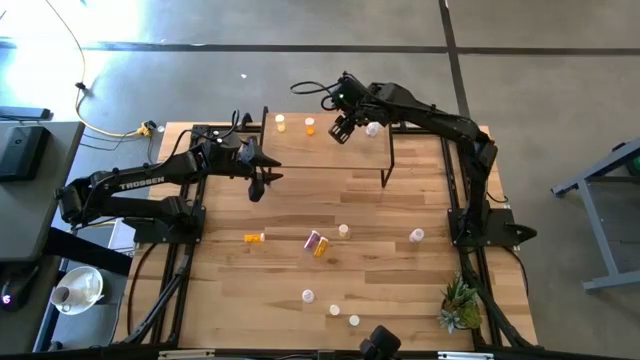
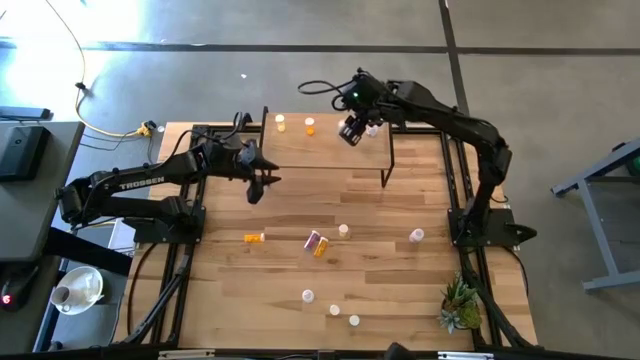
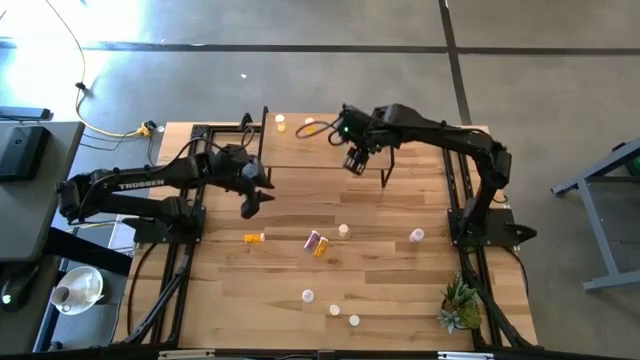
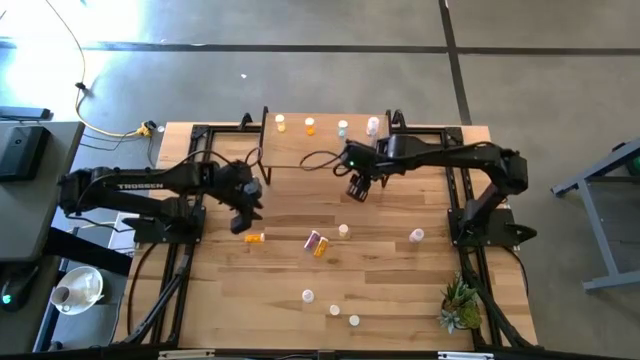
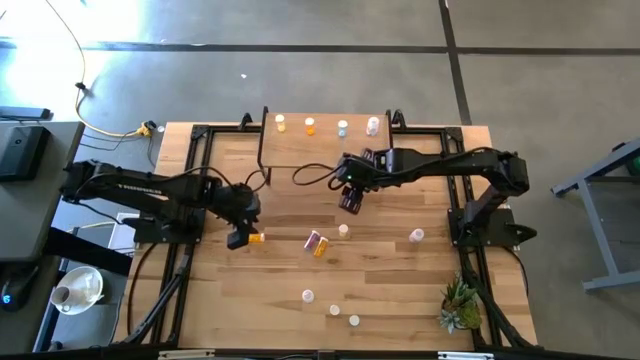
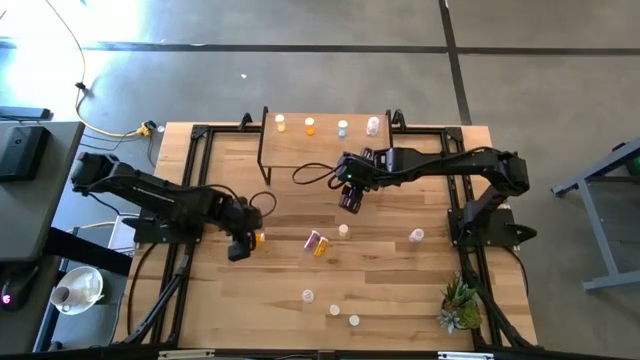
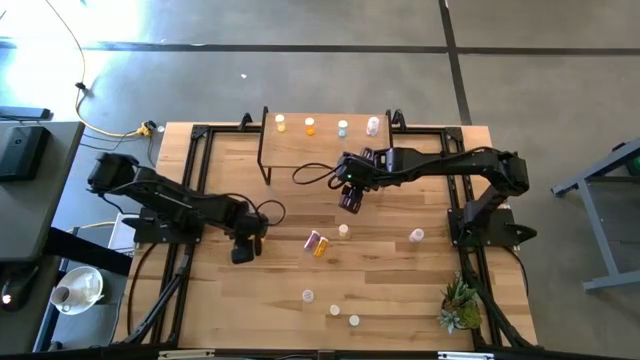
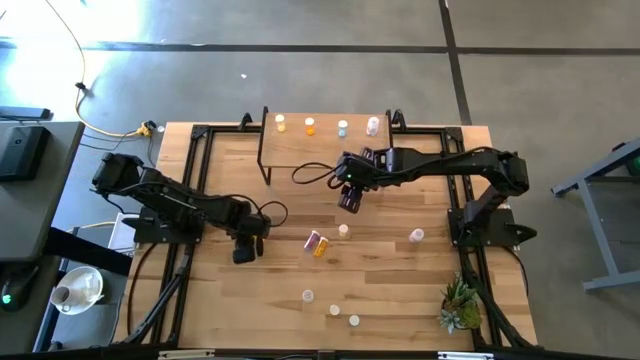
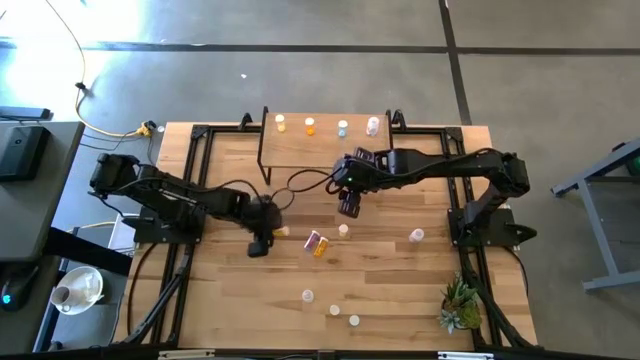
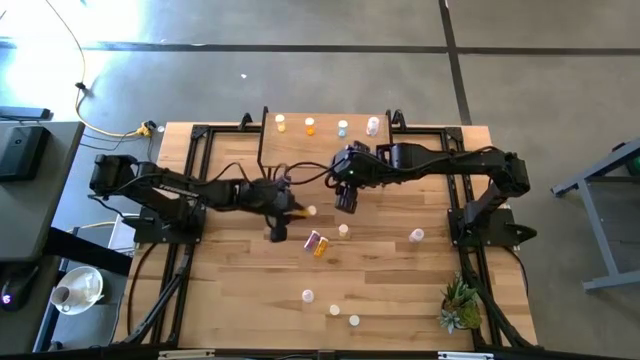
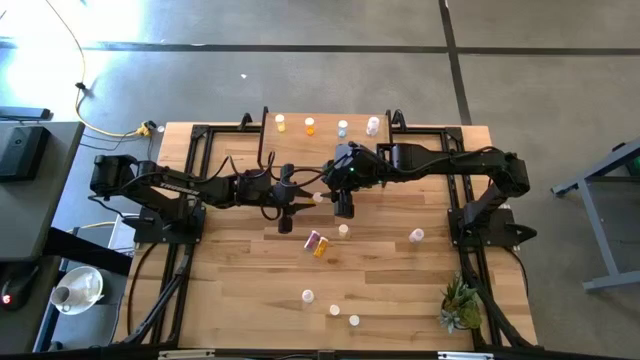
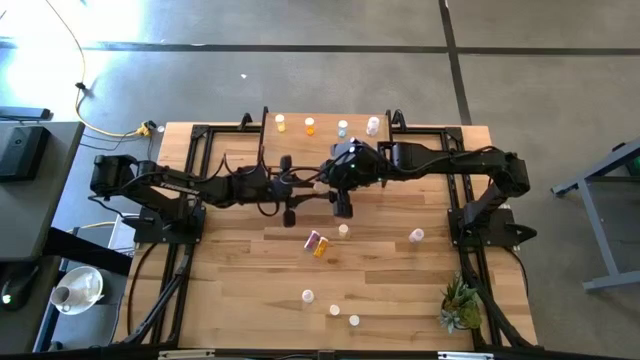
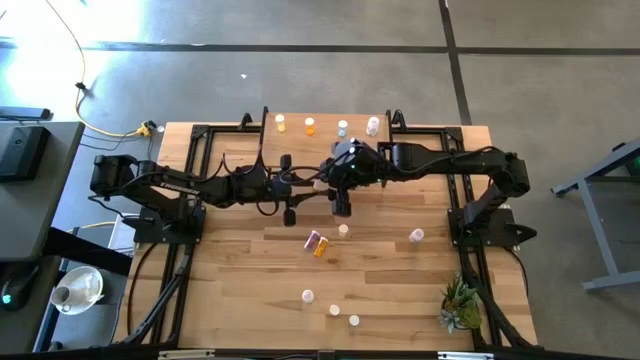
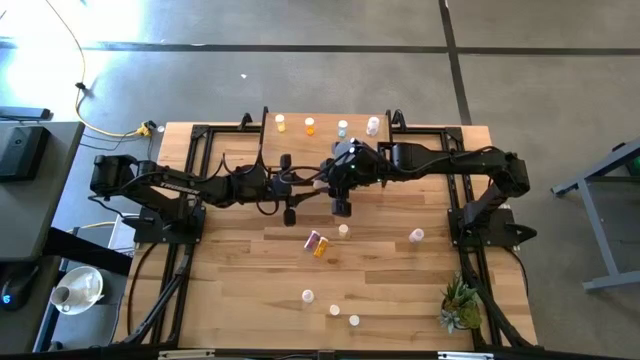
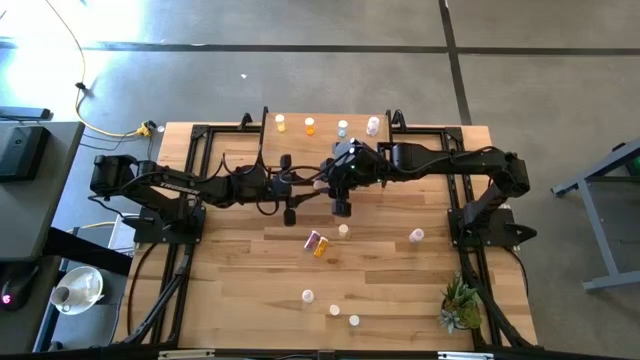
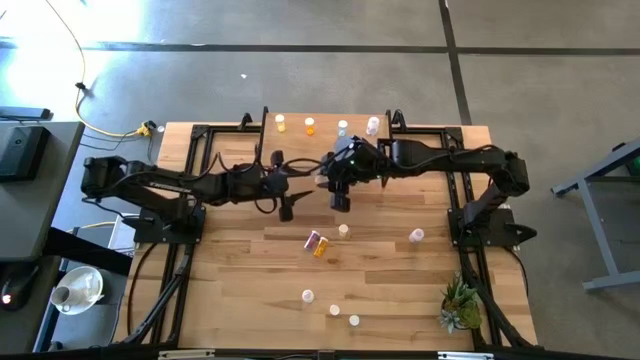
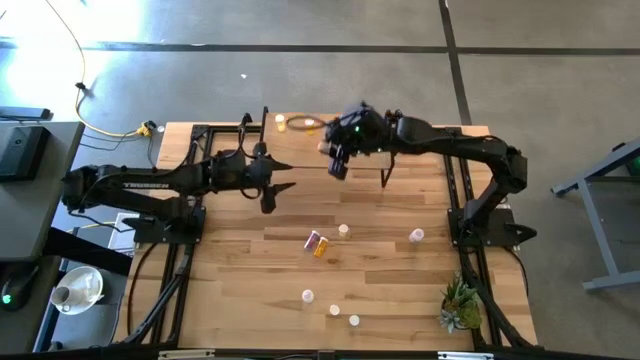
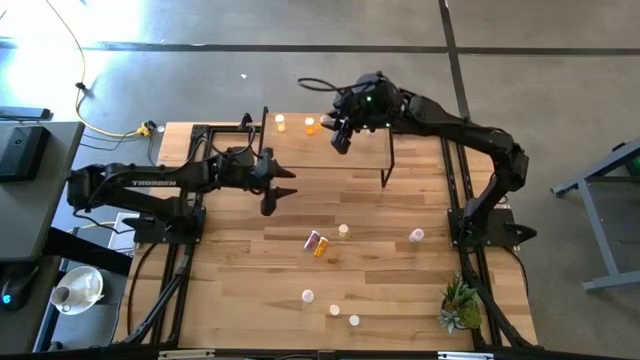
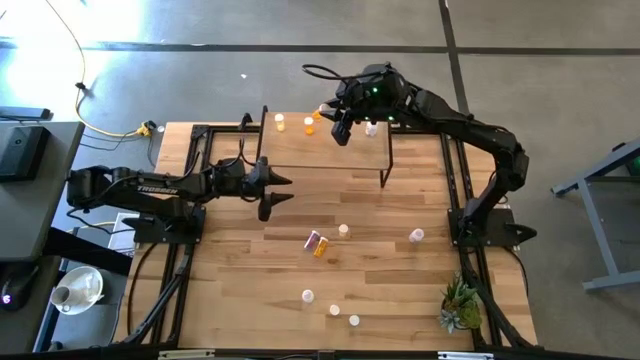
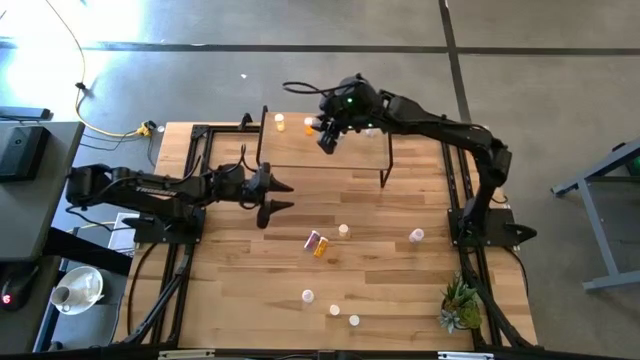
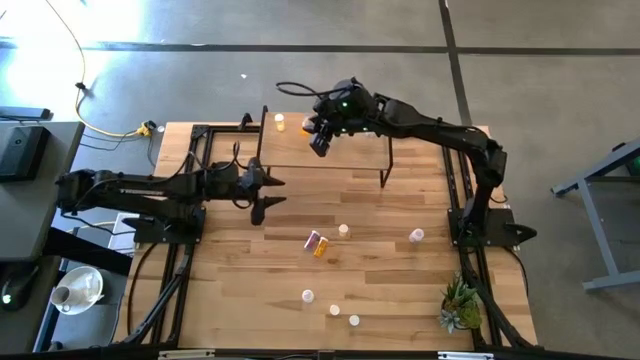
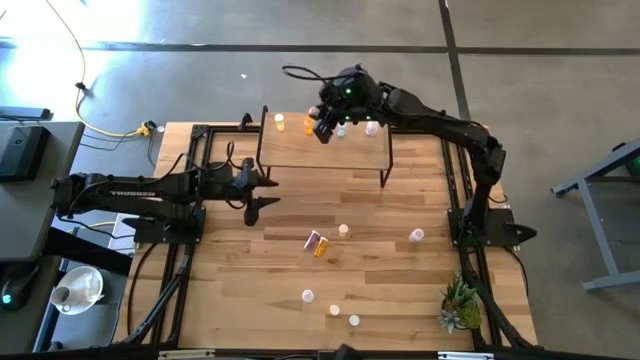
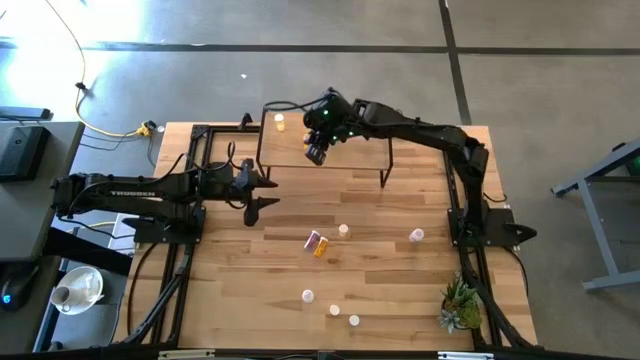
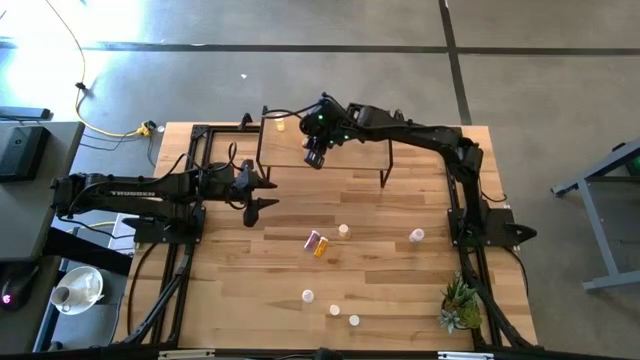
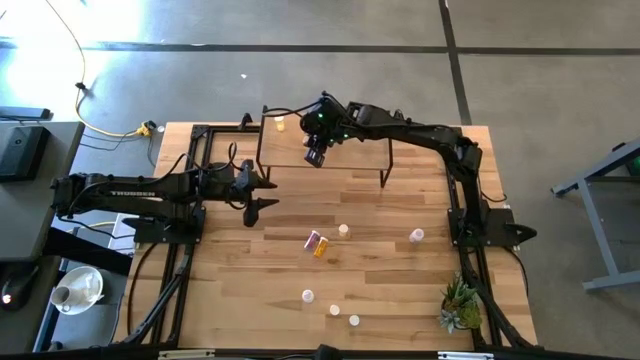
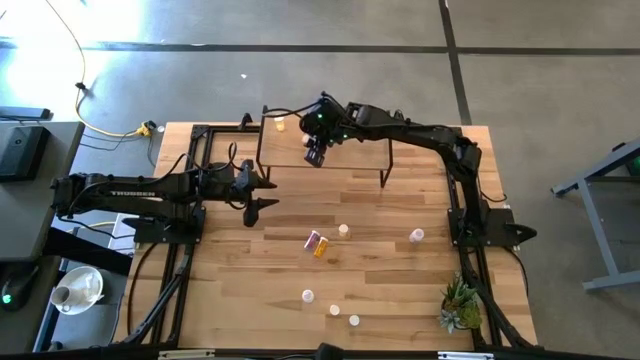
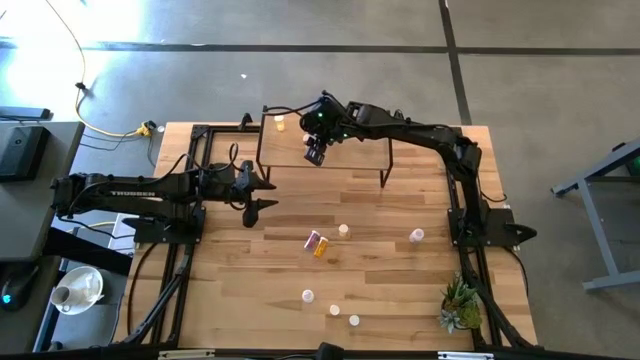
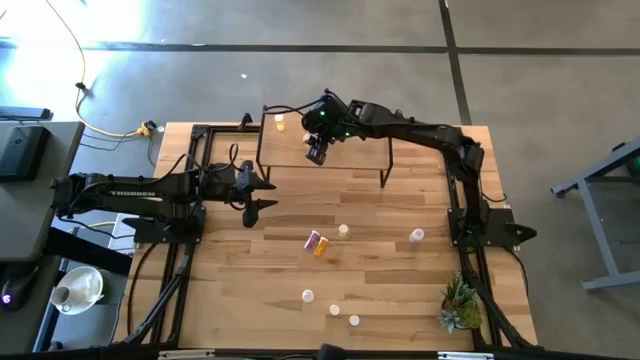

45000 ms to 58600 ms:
Task: Pick and place medicine bottles onto shelf by color
Put the left orange pill bottle on the shelf aligned with the orange pill bottle

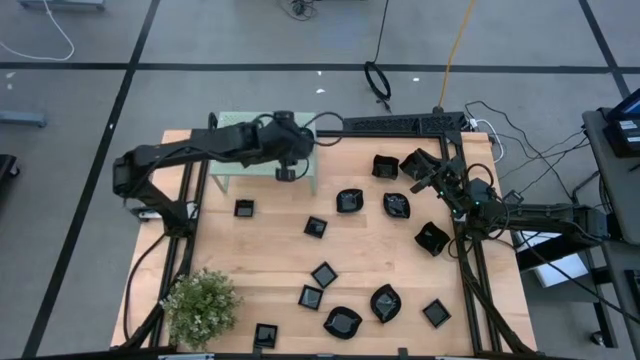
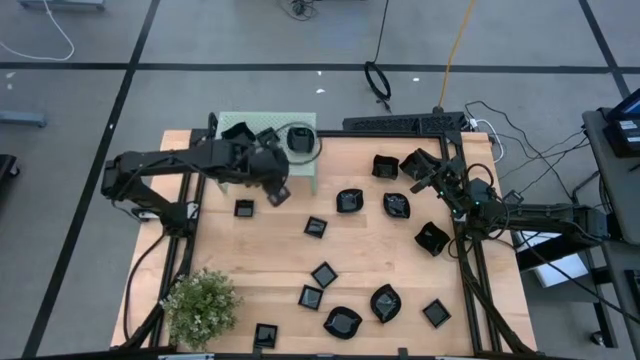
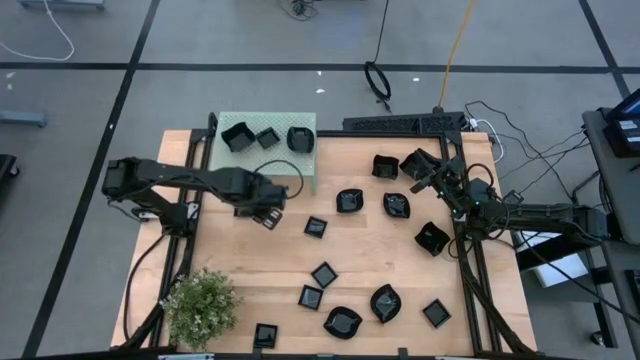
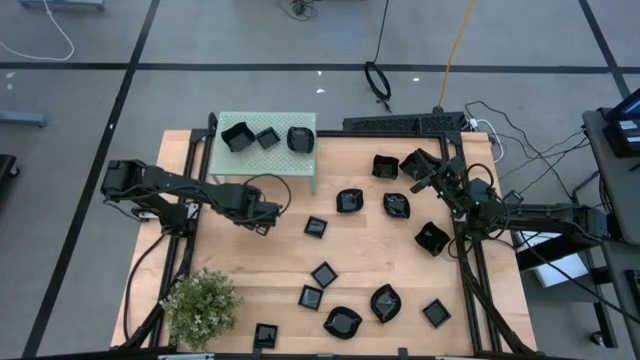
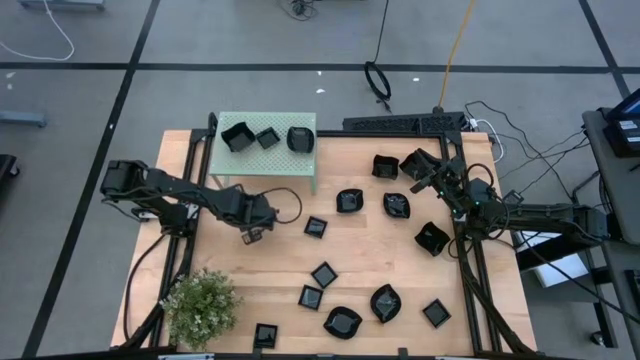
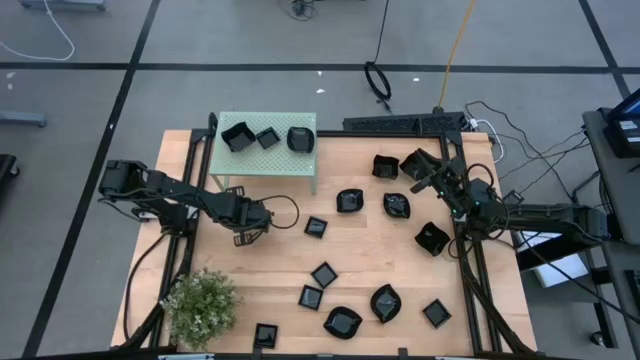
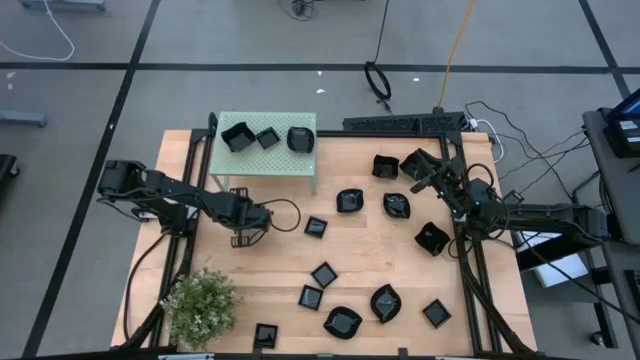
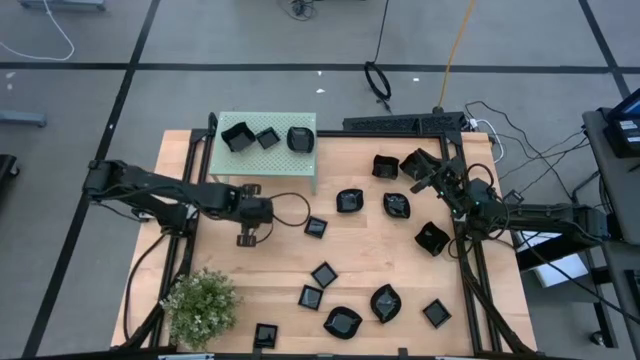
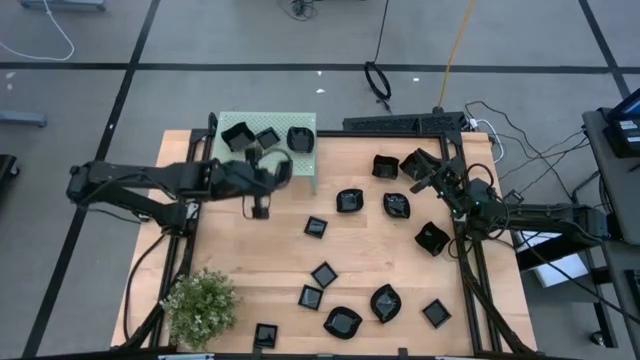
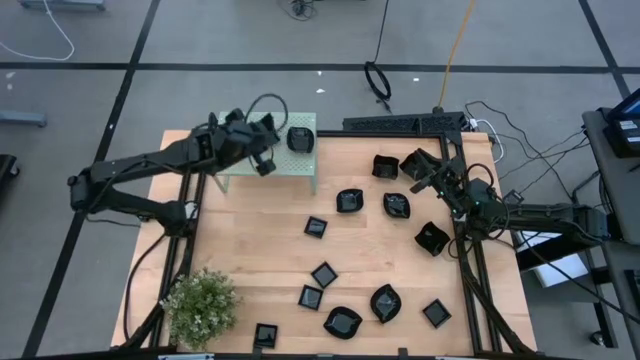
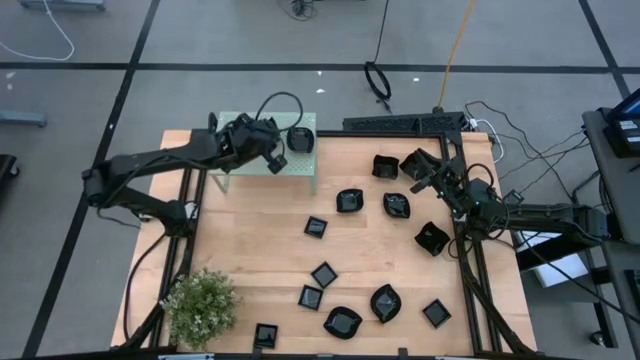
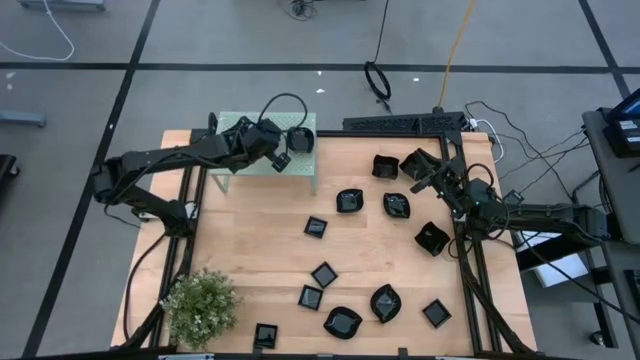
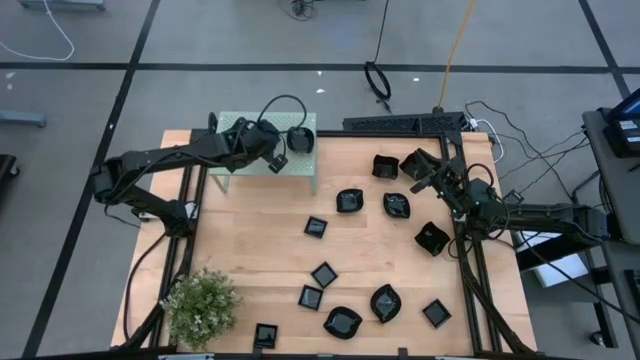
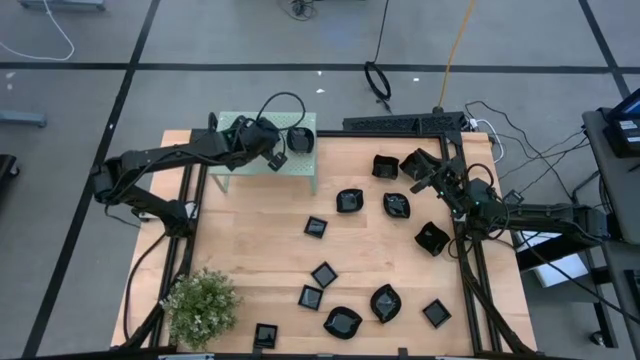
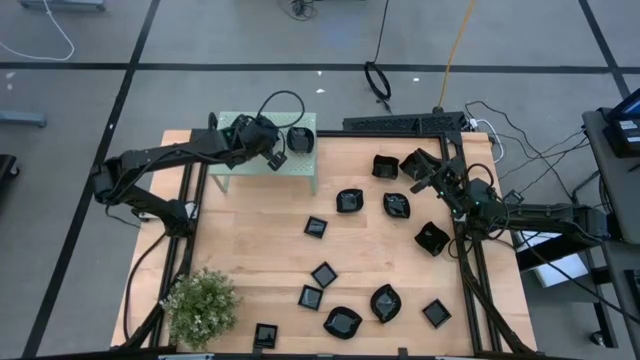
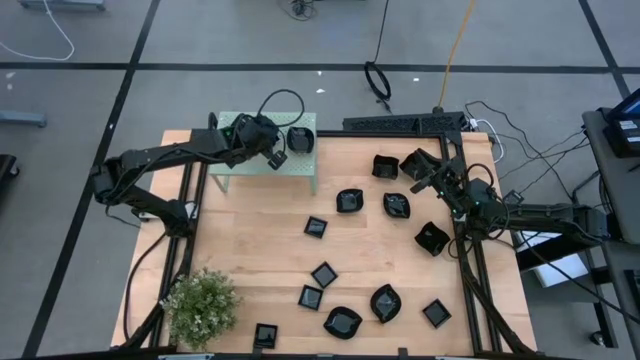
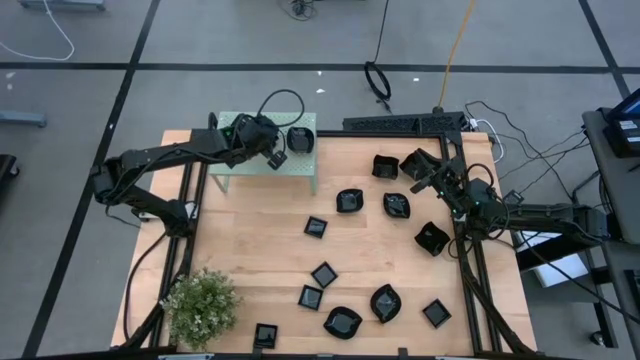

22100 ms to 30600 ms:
Task: Pick & Place Mini shaped plates
Stack the square plate on top of the square plate on the shelf
